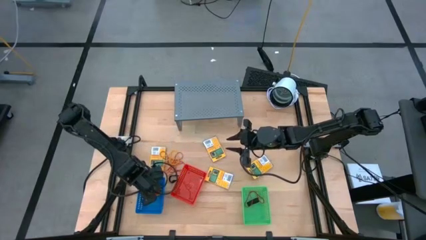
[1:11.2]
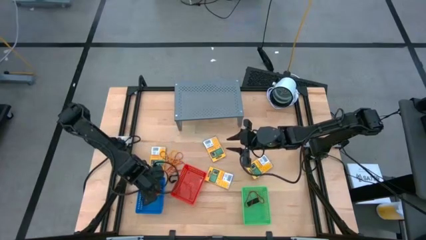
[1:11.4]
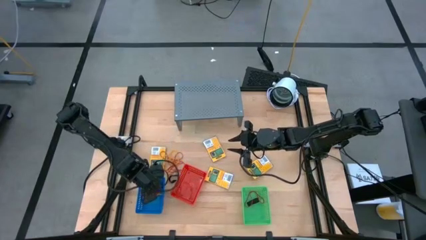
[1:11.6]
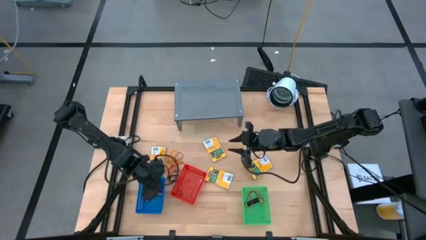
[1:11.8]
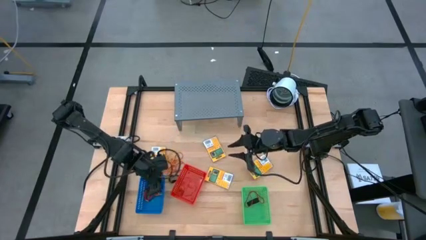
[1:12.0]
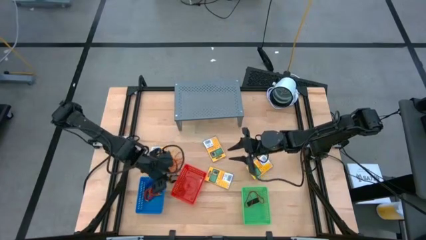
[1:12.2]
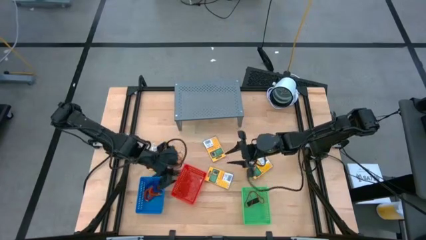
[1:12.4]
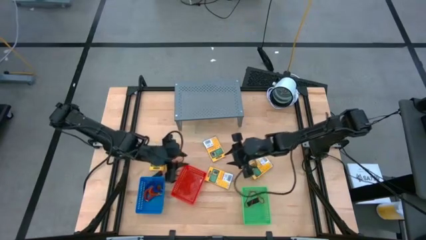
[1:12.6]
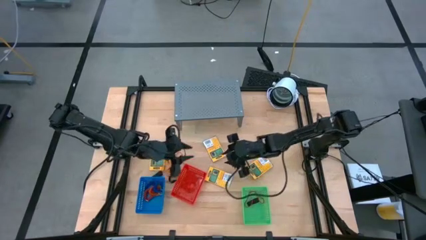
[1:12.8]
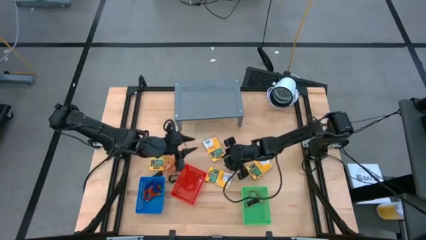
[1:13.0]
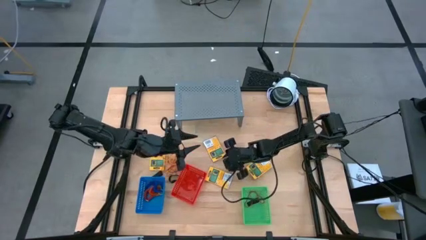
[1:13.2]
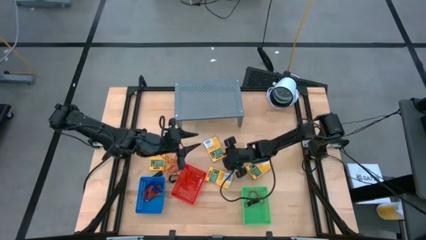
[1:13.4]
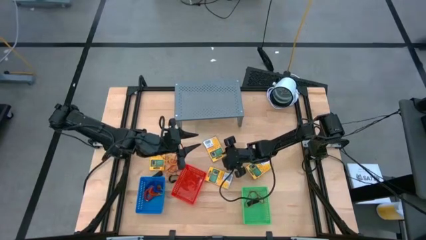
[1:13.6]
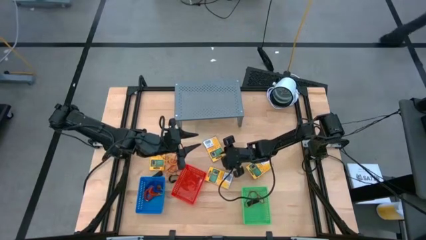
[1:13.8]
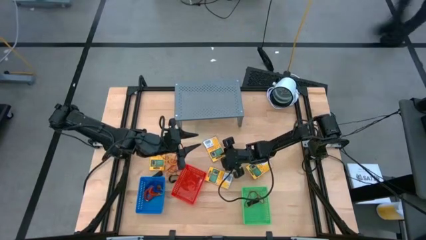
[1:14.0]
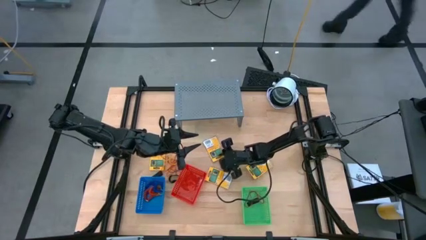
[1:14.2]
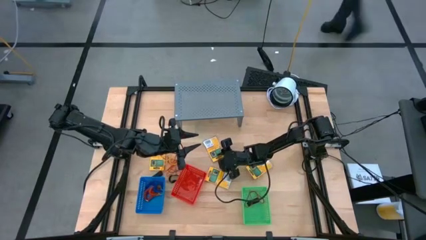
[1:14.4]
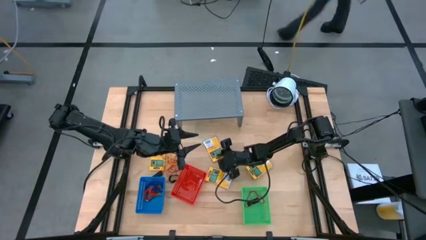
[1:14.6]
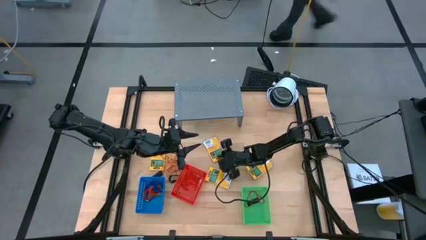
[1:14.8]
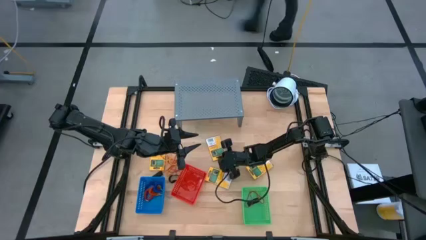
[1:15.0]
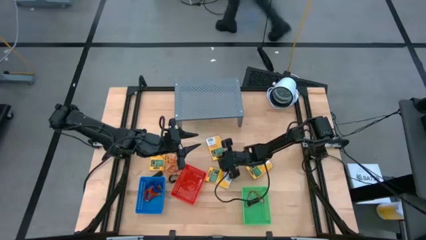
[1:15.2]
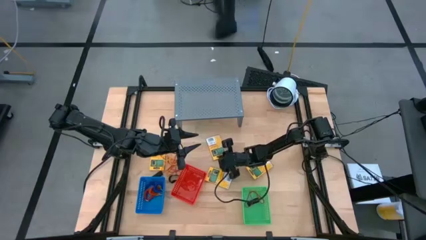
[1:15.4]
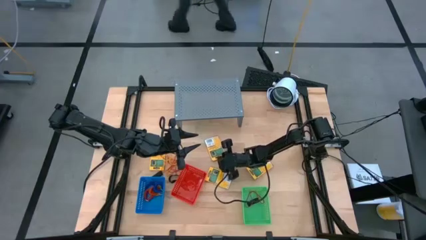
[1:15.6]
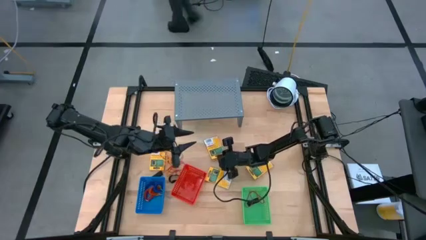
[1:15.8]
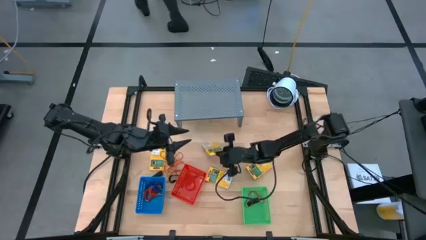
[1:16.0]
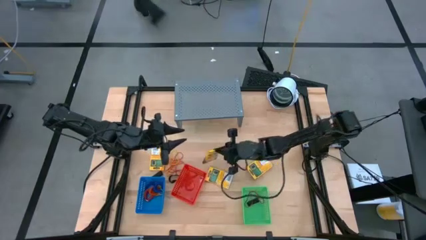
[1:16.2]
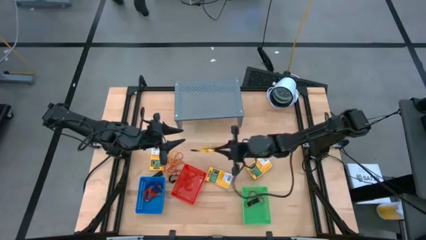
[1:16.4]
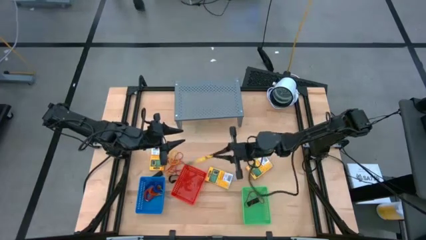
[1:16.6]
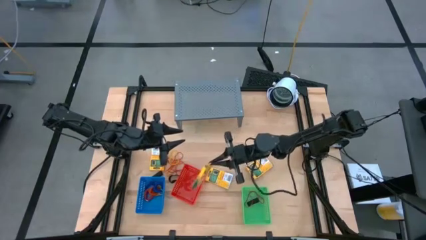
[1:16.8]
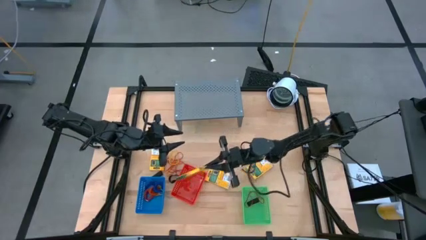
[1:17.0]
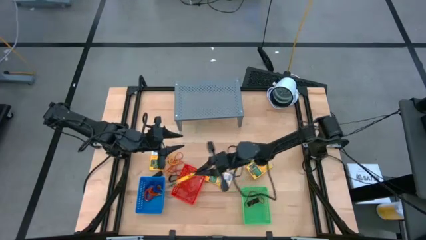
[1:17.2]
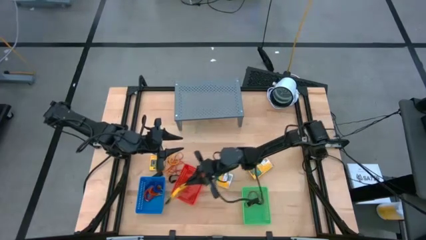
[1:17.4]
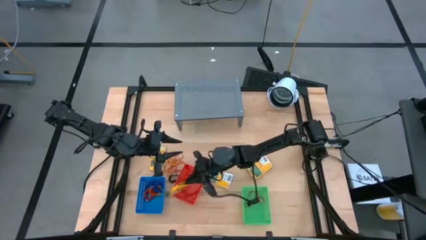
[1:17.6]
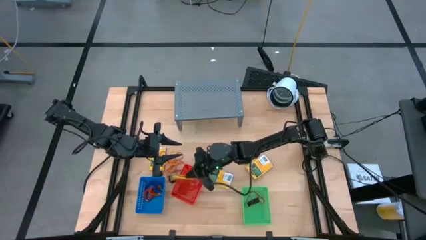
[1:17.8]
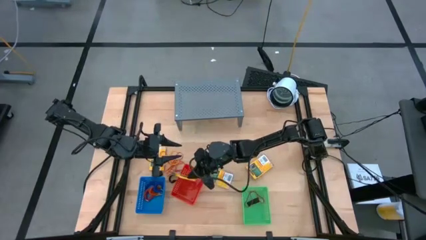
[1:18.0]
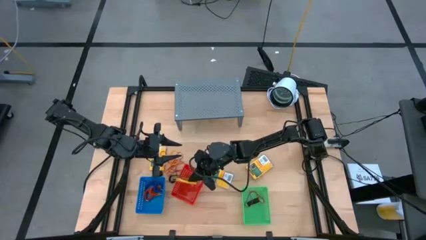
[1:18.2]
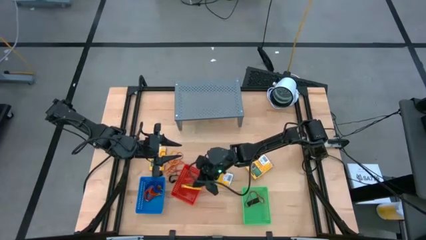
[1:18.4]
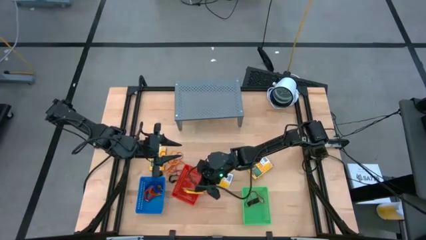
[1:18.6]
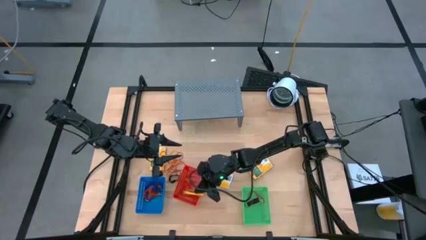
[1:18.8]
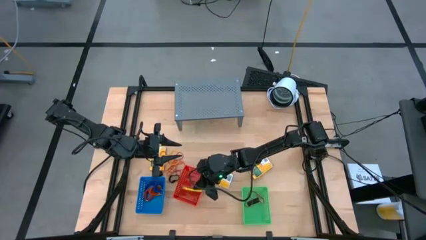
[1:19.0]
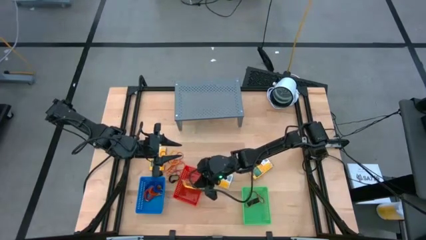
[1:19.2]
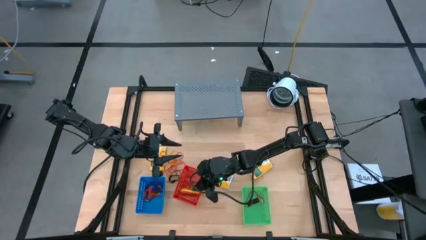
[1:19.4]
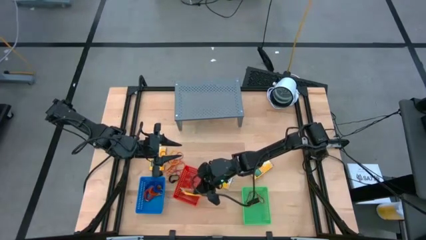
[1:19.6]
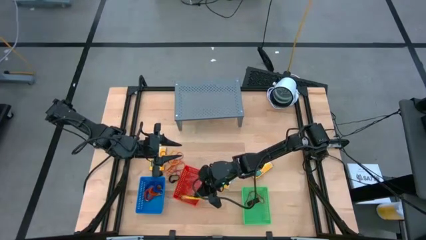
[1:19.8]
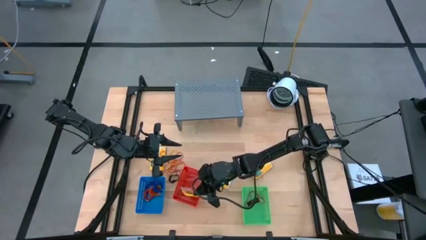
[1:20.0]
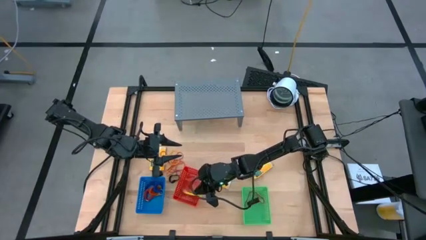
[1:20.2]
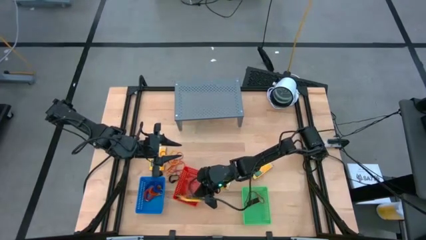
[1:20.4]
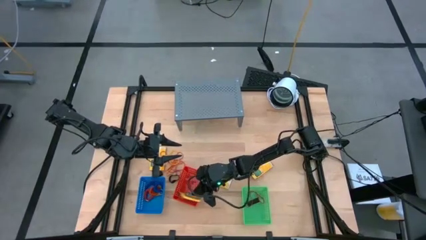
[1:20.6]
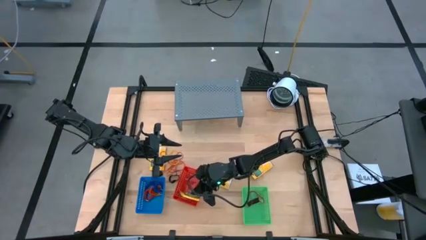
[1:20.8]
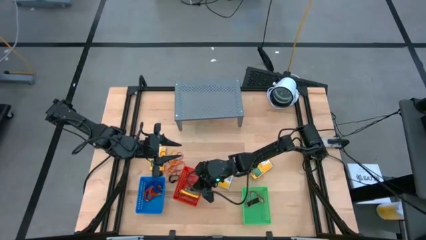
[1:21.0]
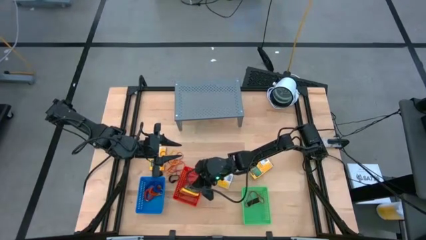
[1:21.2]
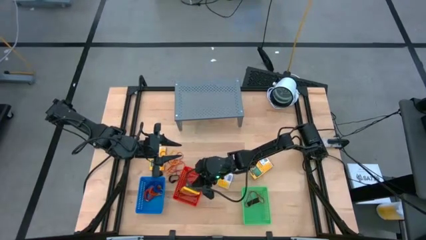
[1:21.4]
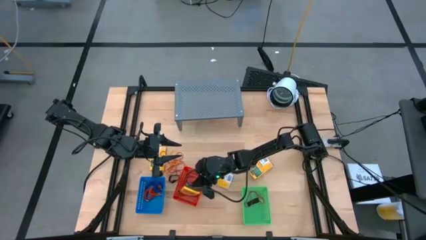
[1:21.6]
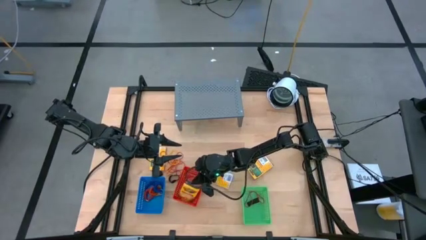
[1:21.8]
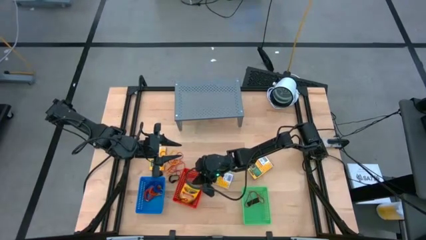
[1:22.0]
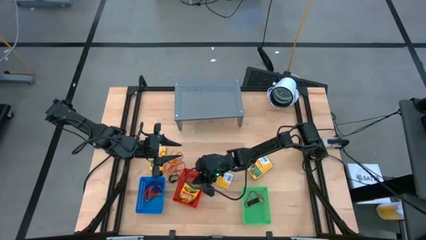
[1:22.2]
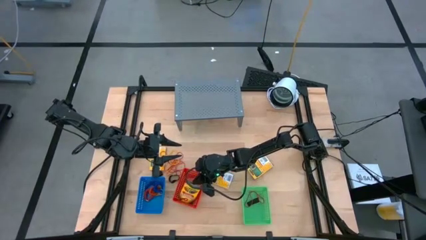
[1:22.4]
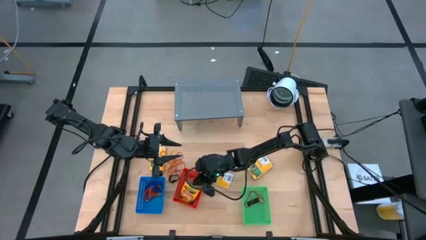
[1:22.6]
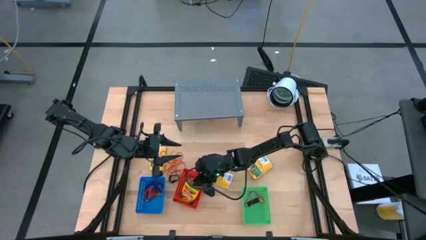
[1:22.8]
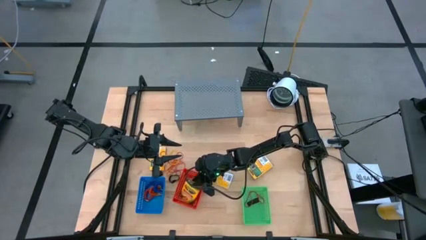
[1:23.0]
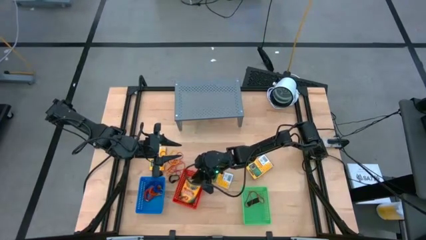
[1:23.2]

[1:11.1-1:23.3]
Task: Pick & Place Office Desk Supplies
Put the yellow crayon box into the red basket
